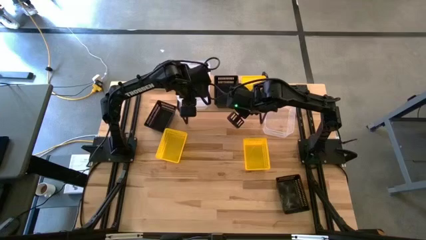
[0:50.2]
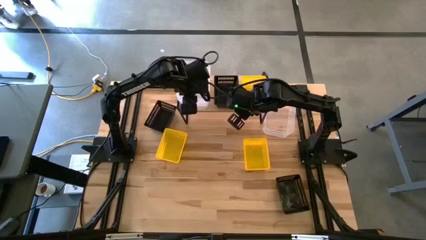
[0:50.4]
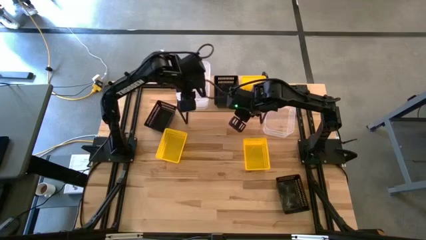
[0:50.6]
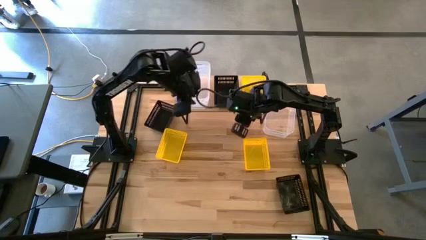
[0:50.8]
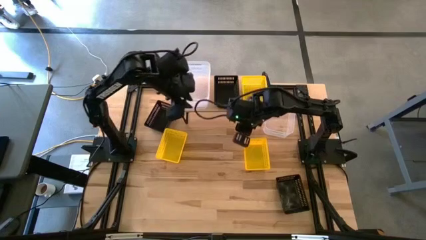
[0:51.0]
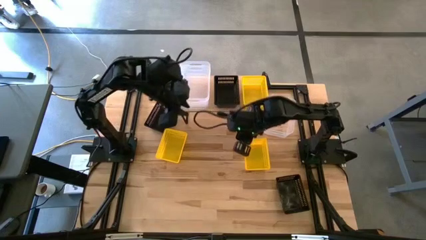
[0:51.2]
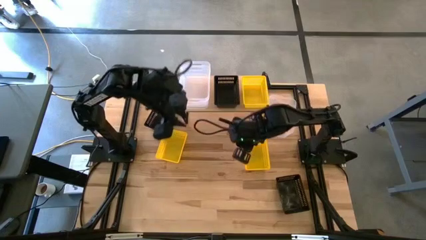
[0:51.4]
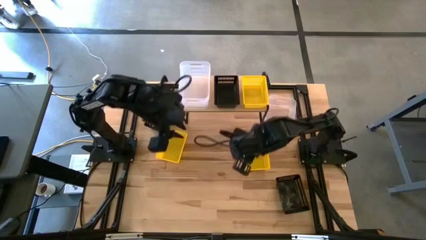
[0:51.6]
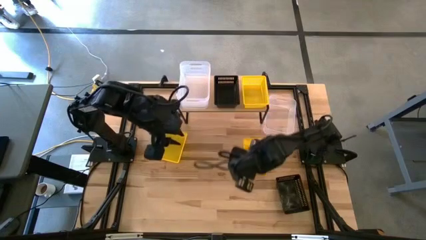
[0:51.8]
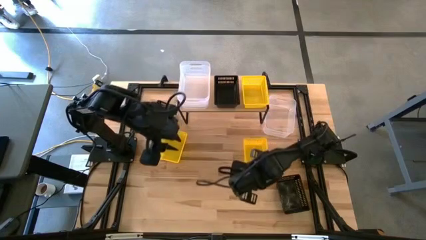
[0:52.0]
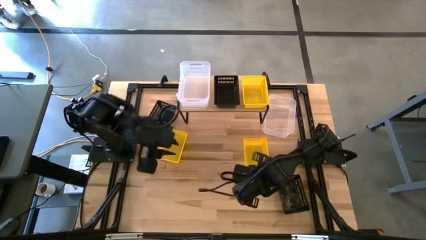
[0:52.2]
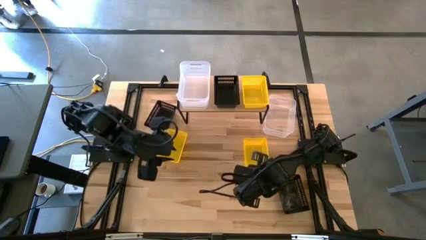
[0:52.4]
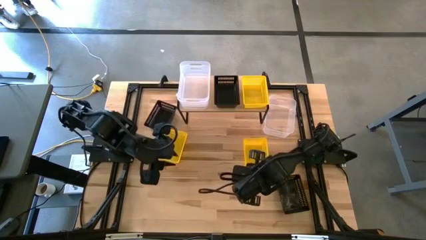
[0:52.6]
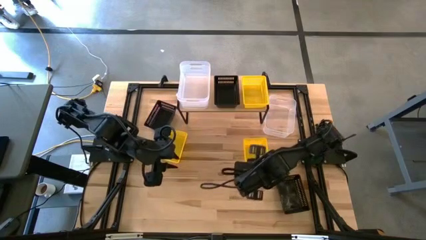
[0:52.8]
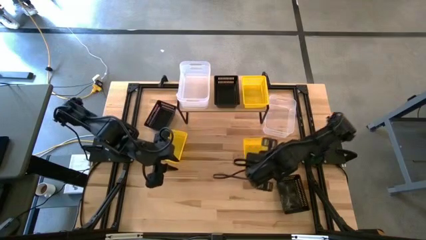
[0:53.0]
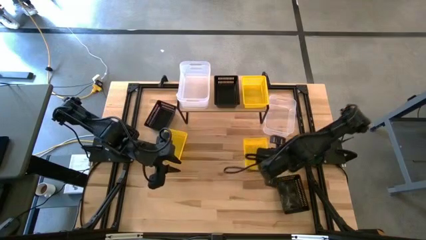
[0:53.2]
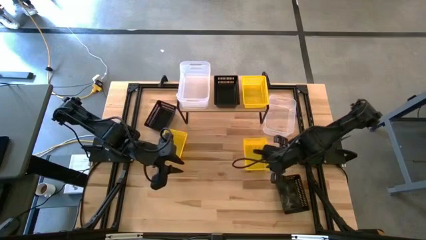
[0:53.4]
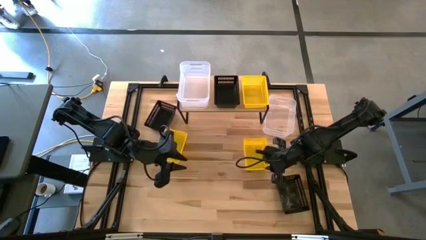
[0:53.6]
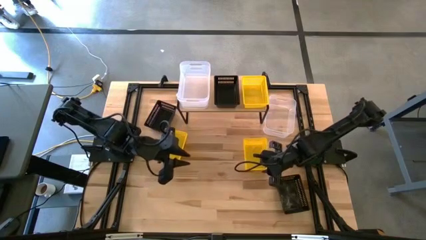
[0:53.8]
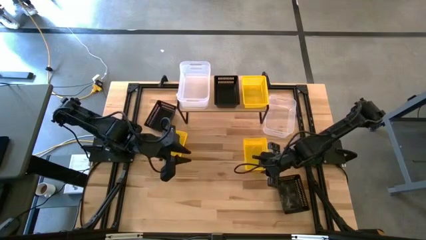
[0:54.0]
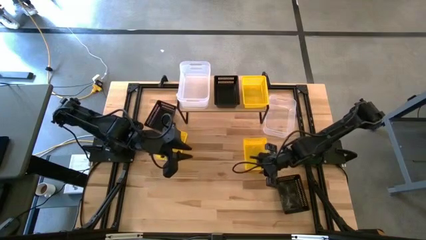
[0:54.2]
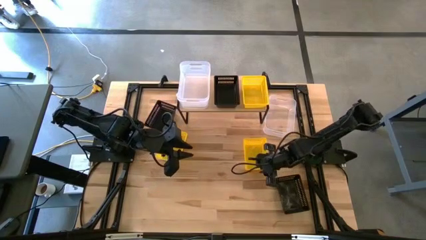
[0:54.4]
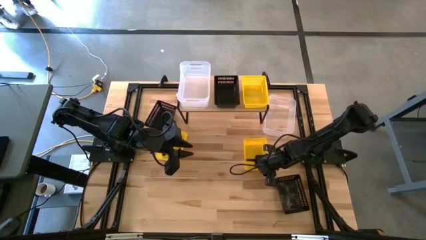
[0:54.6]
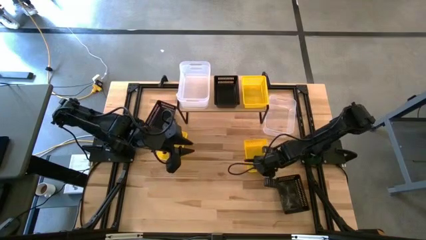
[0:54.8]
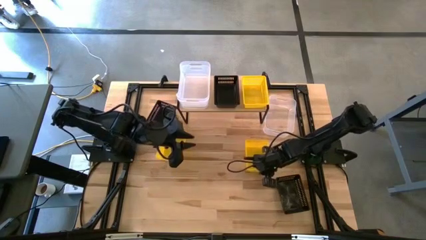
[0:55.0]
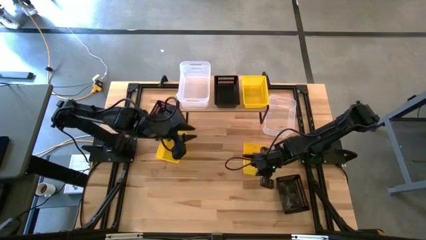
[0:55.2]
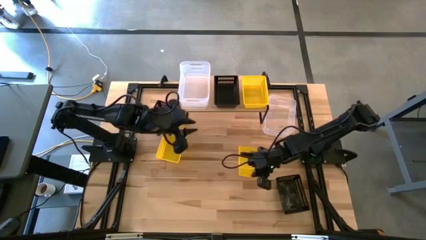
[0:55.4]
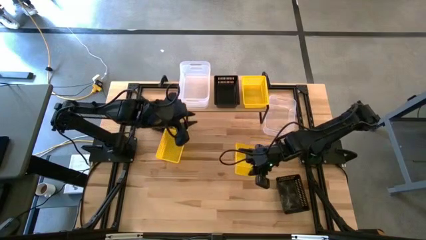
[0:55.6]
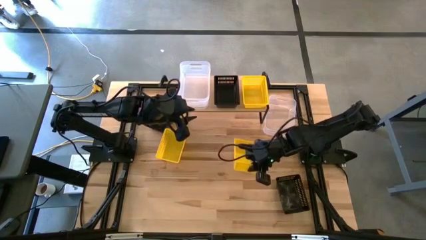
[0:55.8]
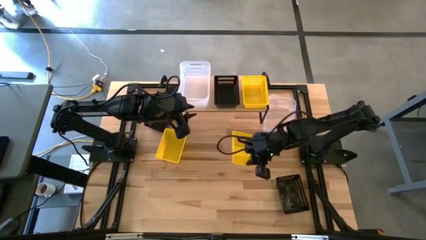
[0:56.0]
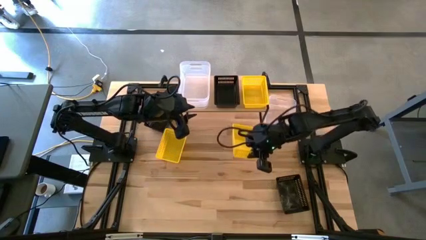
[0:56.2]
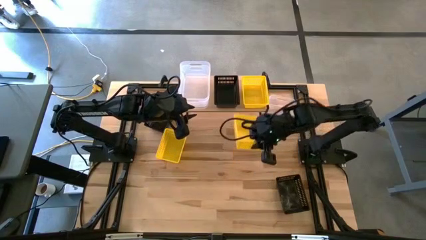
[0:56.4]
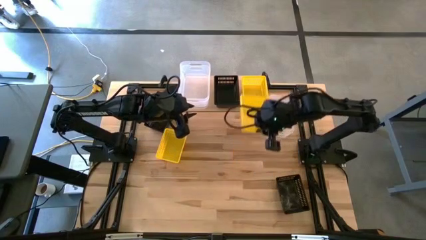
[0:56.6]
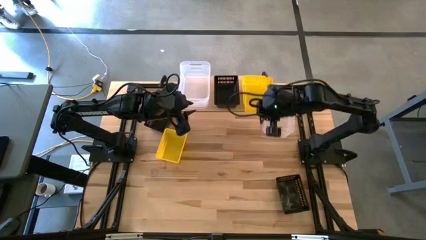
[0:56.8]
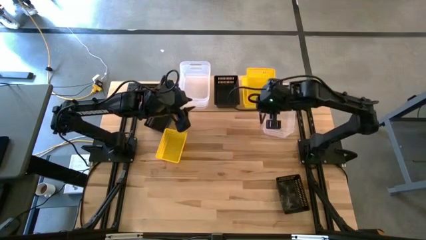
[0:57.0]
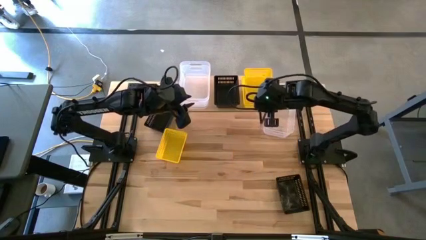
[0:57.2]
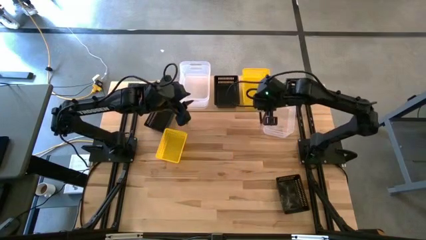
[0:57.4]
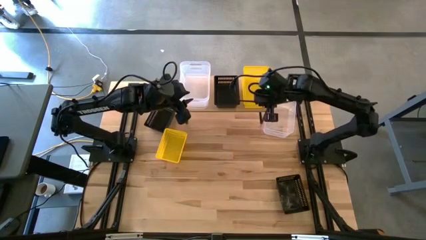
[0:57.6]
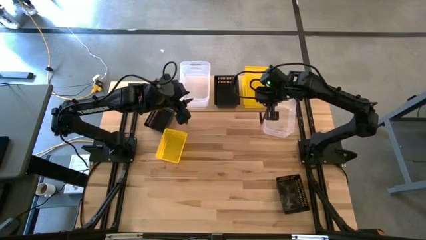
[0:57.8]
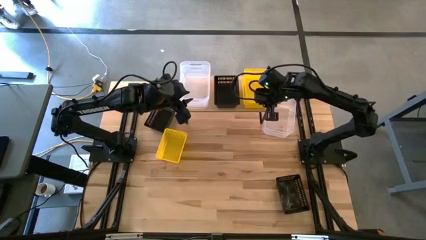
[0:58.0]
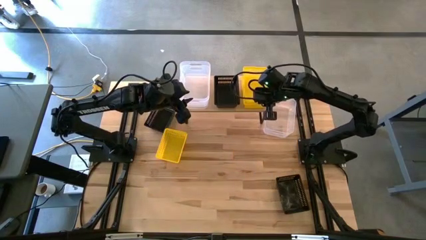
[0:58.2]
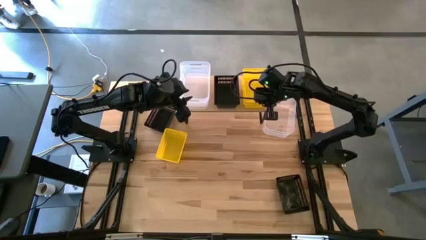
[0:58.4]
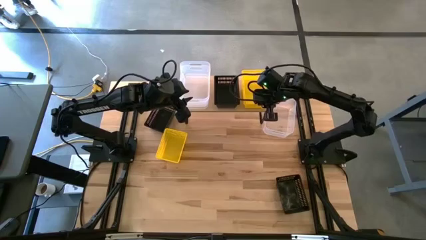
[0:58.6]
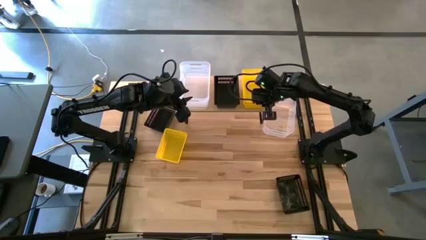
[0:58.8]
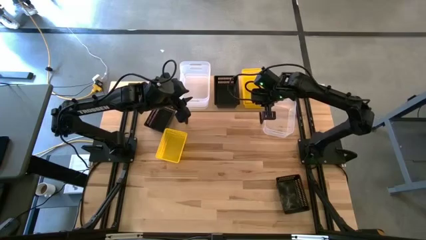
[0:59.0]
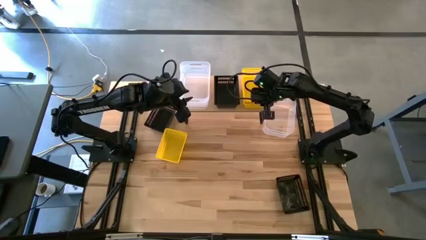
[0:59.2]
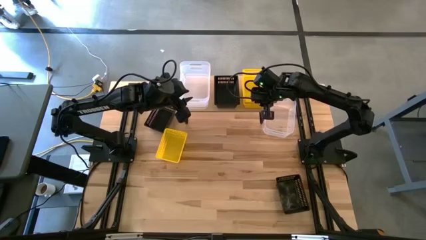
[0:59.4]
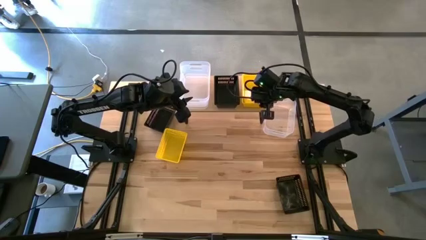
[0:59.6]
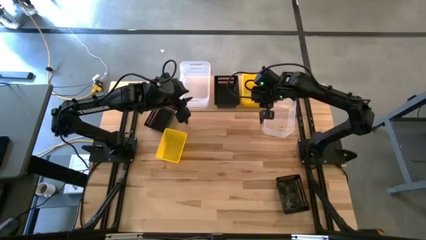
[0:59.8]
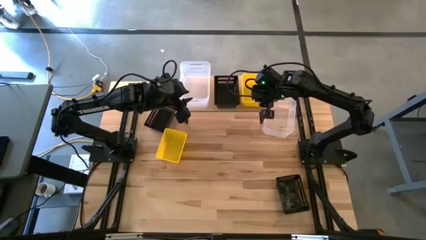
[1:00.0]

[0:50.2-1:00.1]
Task: Stack baskets on shelf by color
Stack the right yellow bin on top of the yellow bin

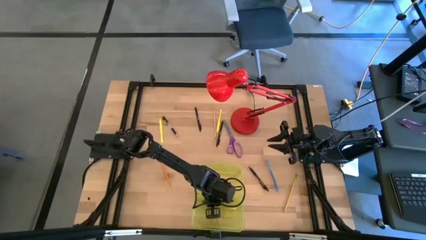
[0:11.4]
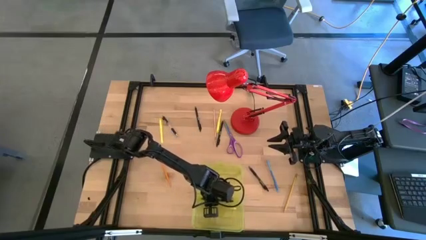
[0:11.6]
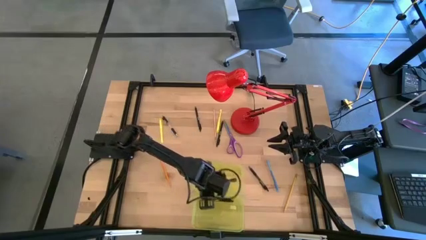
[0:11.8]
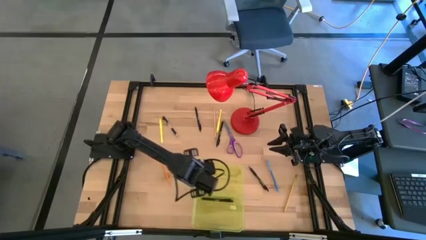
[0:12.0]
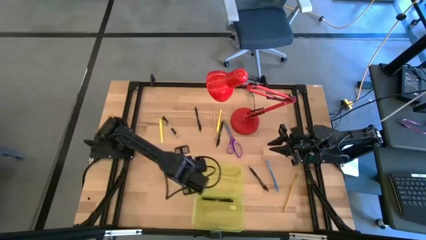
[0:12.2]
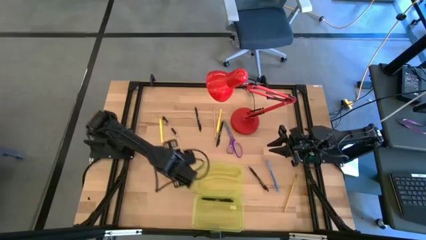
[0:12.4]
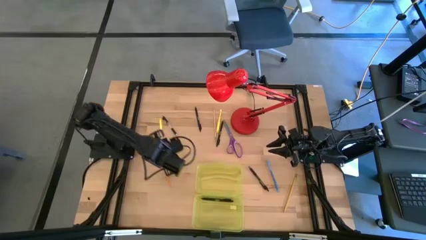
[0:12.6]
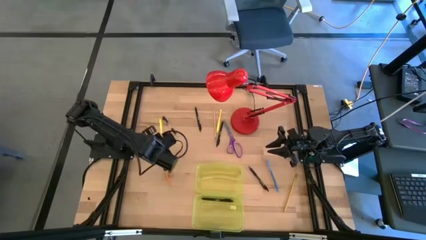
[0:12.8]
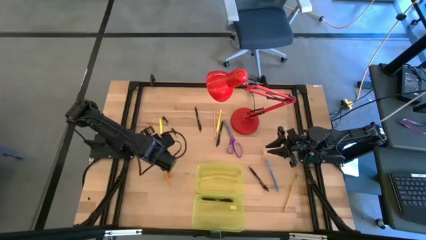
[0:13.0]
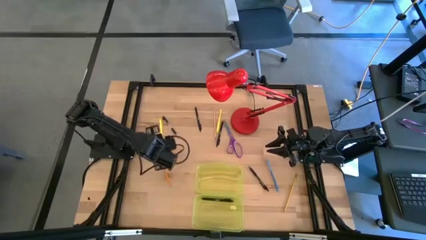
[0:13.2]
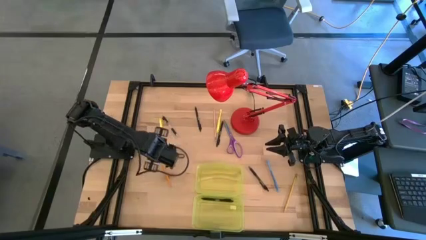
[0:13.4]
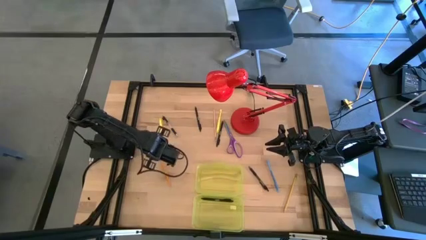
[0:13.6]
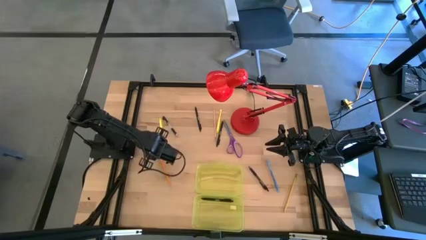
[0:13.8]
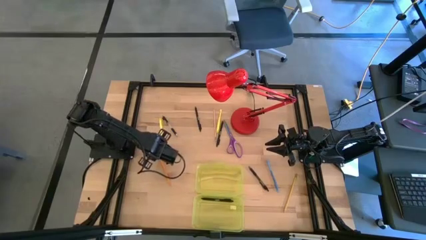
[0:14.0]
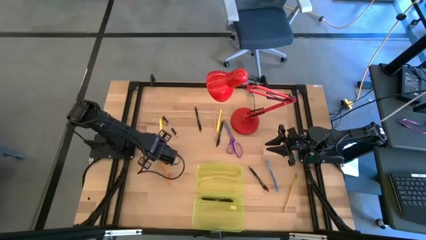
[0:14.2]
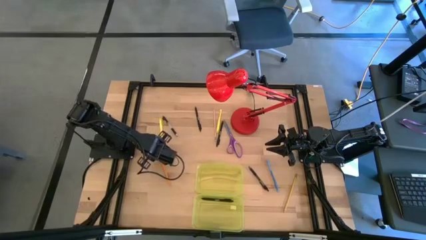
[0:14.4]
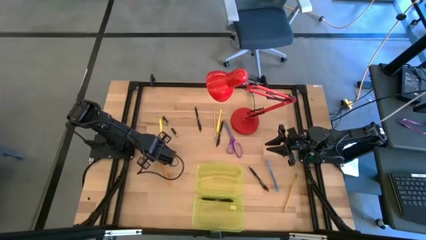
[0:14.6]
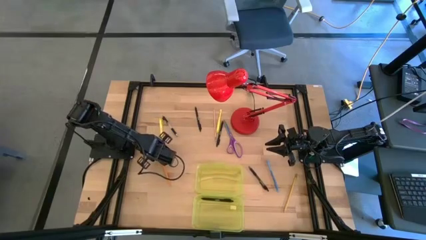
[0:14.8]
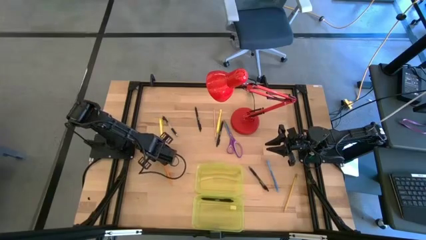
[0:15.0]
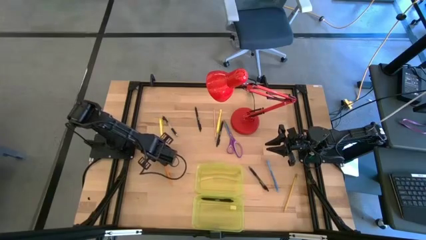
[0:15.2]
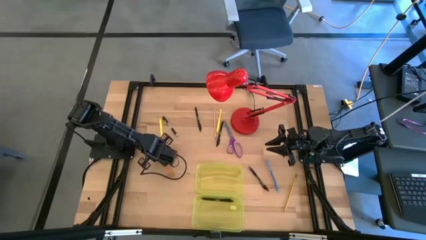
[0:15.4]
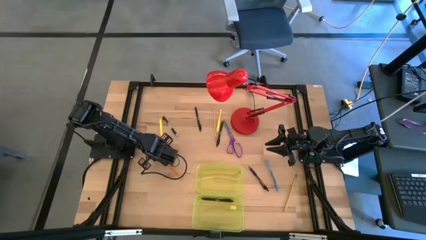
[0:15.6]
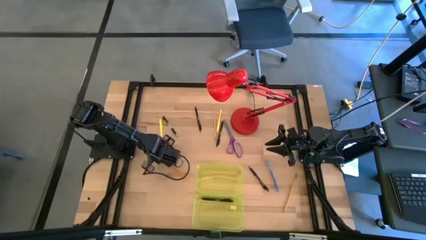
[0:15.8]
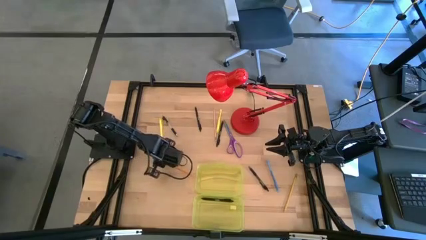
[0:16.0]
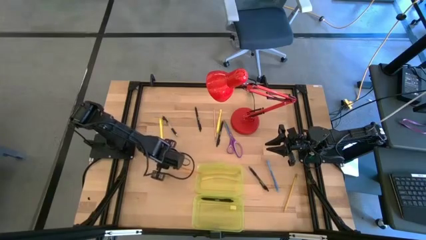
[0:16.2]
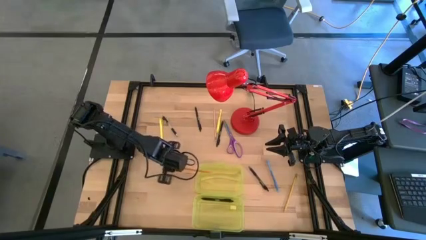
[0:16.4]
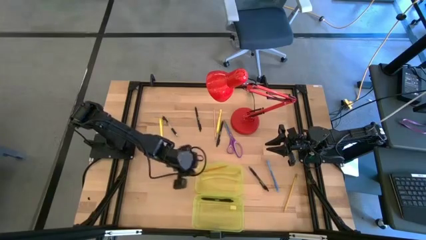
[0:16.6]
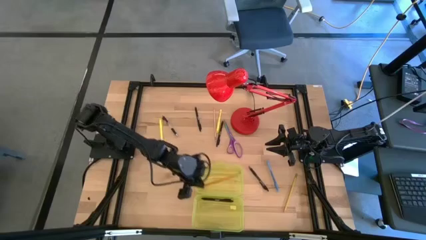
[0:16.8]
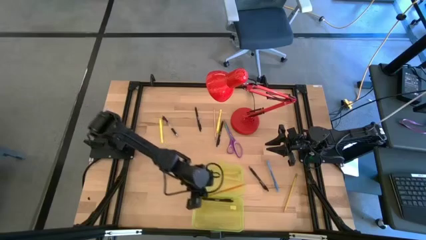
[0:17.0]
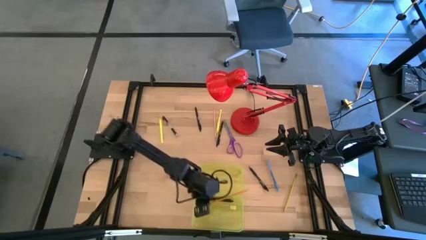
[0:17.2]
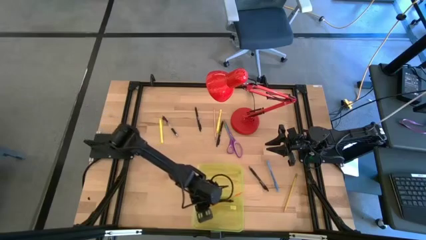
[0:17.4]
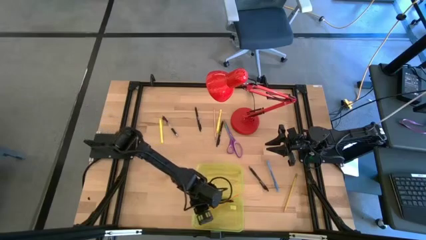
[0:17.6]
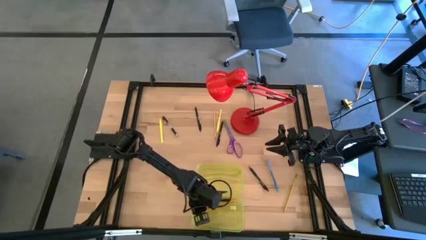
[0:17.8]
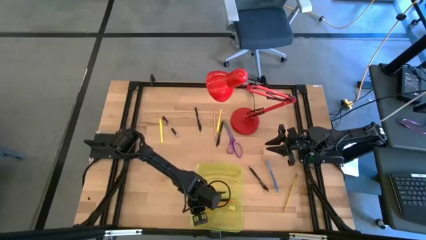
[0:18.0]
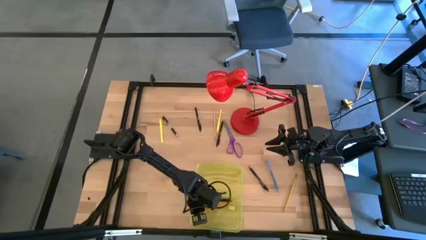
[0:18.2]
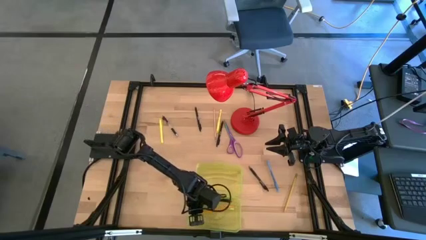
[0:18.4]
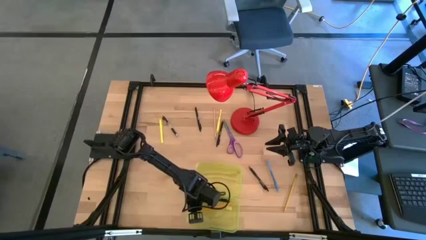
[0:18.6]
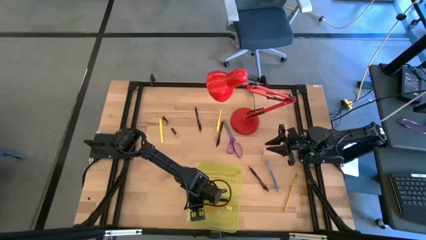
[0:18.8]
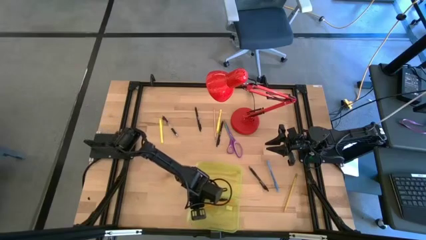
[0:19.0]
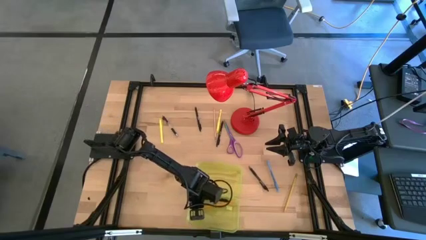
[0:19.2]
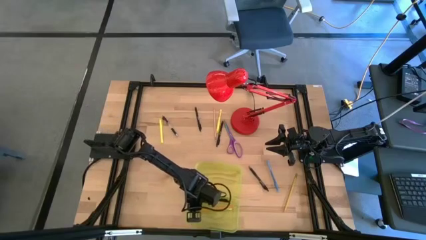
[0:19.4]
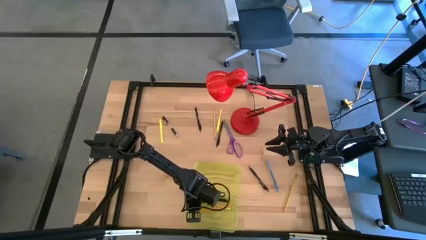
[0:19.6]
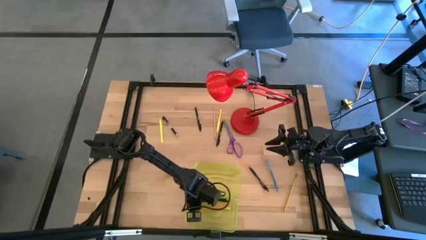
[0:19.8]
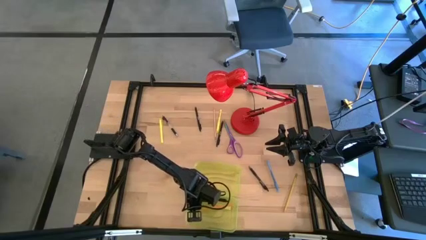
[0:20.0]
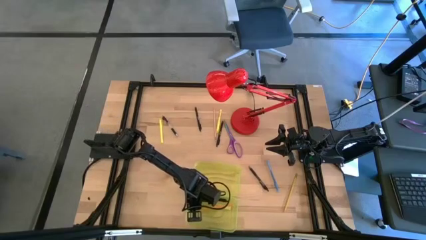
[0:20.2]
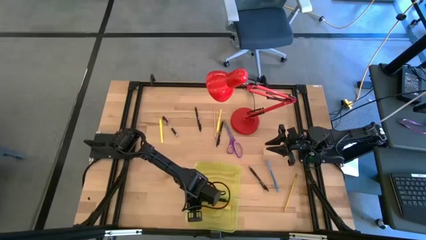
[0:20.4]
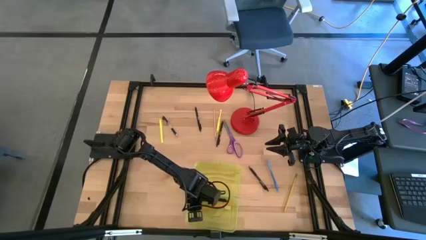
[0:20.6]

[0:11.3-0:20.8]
Task: Pick & place school supplies into a supply box
Put the orange pencil into the yellow supply box
